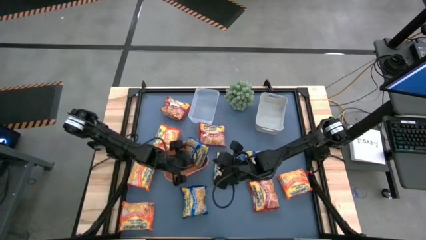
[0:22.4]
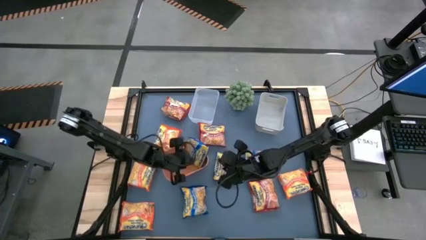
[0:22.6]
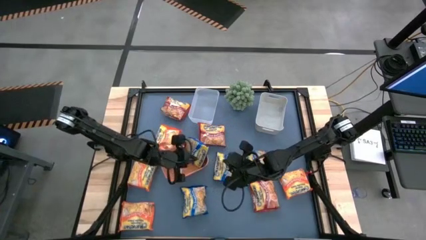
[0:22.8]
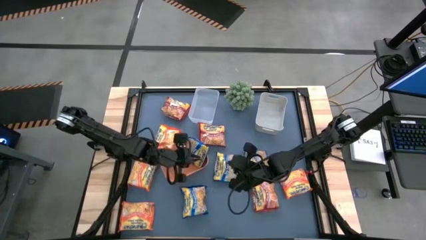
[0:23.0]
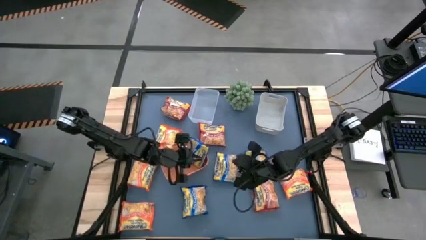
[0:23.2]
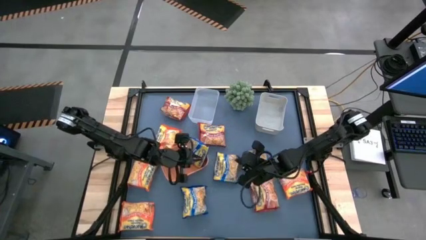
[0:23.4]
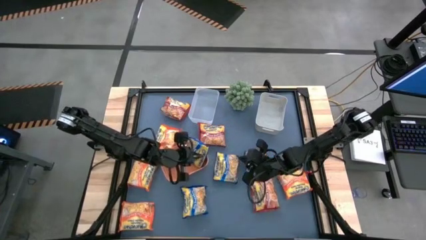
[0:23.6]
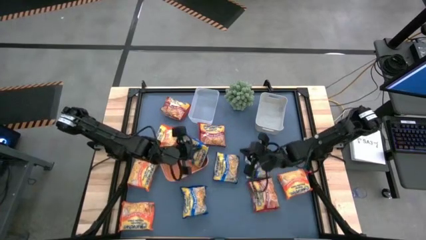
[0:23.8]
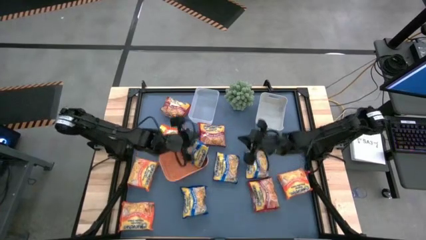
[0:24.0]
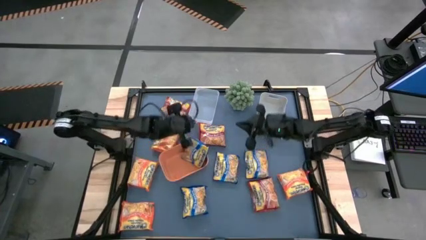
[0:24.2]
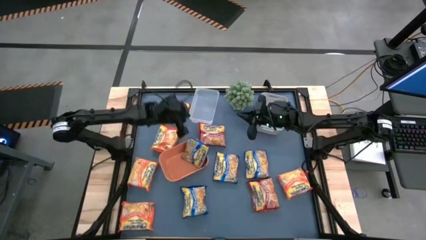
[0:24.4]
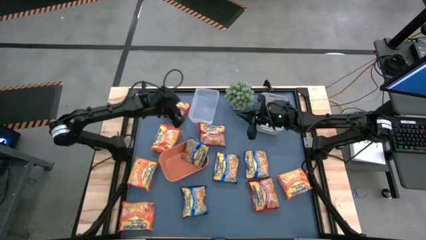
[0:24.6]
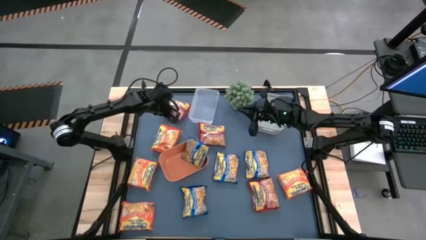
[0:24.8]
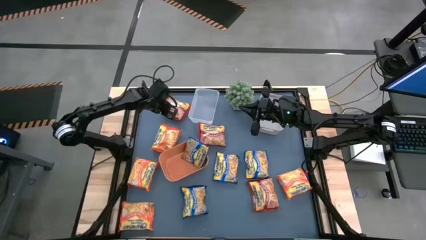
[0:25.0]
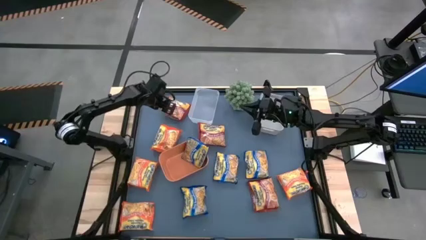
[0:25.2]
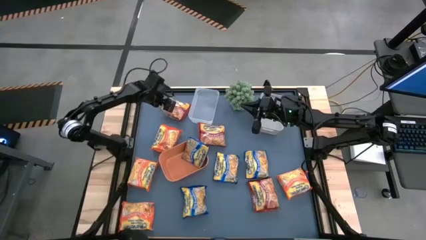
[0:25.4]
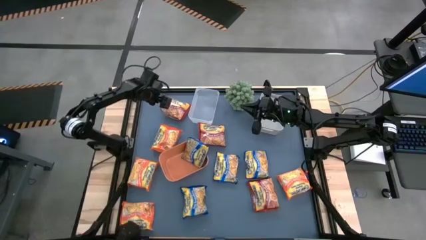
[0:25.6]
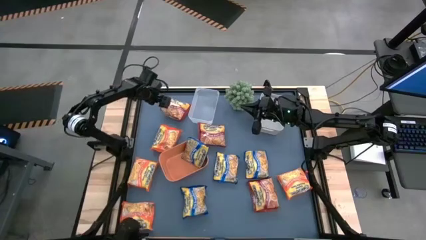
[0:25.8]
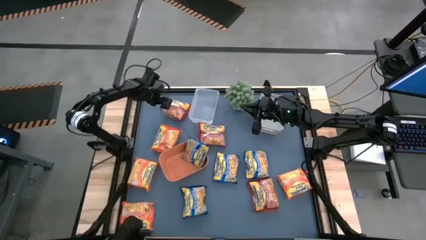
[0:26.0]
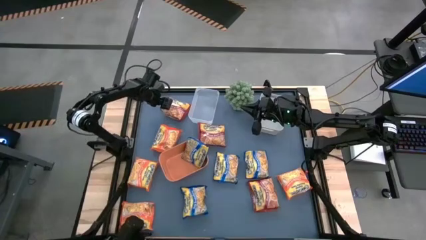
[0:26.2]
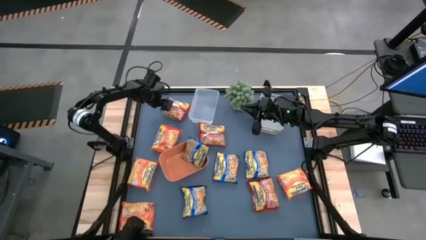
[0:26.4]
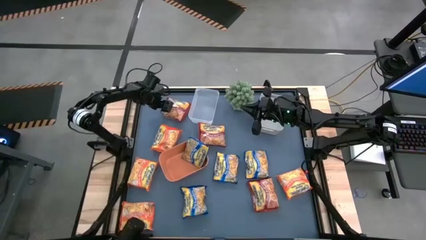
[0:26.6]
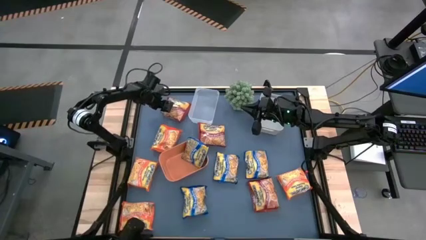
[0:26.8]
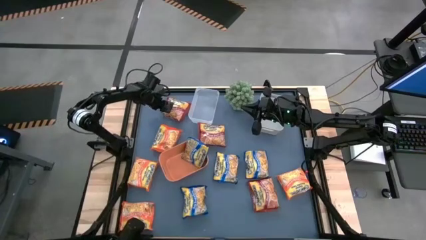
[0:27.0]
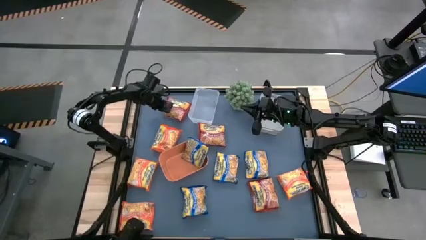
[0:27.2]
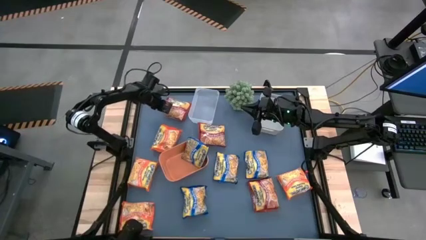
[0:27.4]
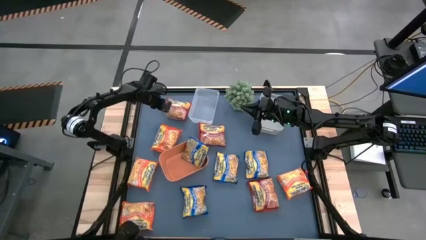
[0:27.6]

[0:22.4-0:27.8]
Task: Sort Maruchan noodles
Put the red noodle pack into the transparent bin

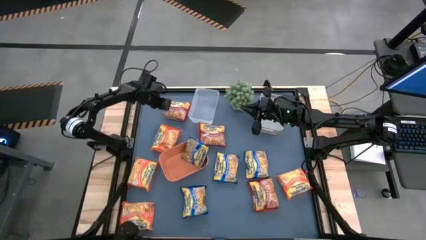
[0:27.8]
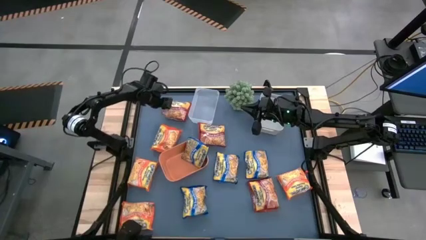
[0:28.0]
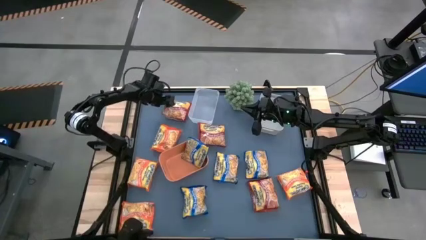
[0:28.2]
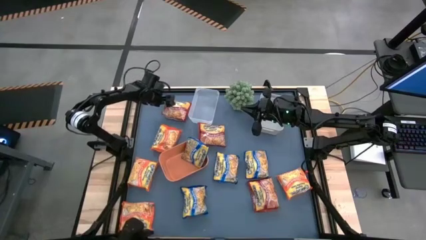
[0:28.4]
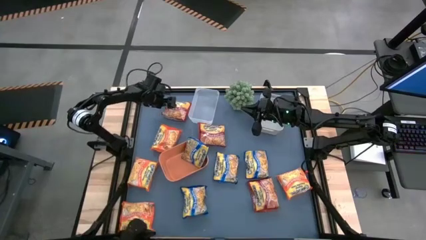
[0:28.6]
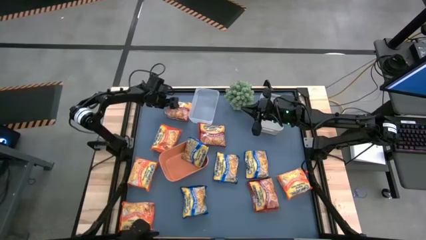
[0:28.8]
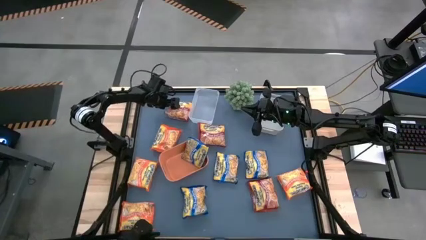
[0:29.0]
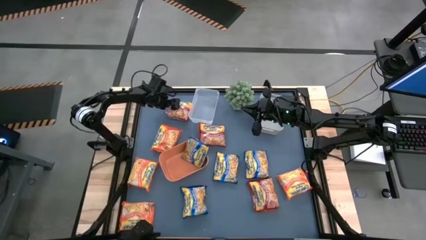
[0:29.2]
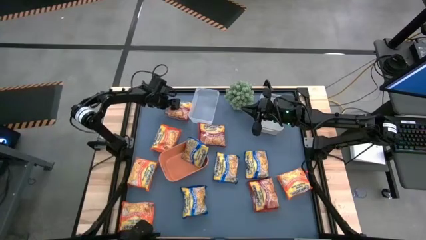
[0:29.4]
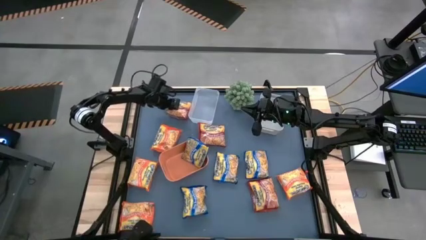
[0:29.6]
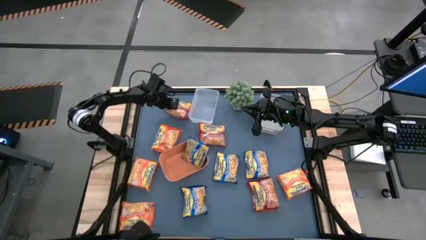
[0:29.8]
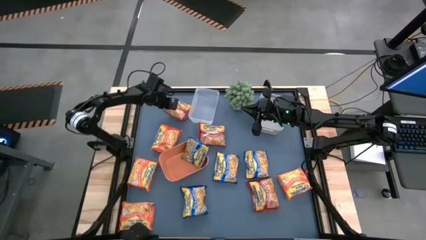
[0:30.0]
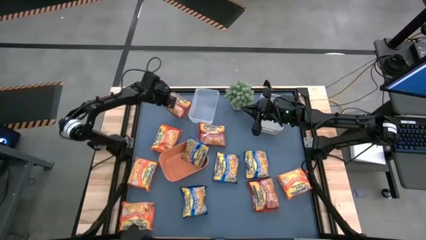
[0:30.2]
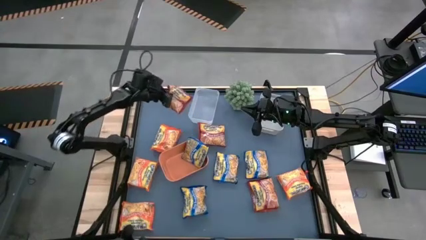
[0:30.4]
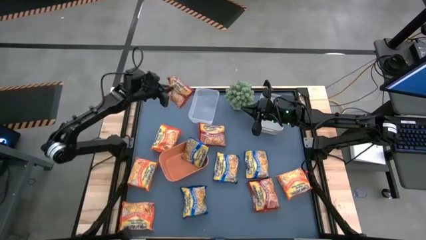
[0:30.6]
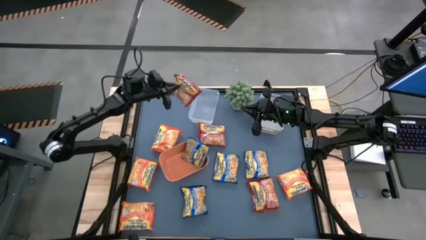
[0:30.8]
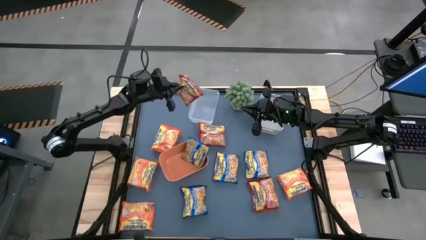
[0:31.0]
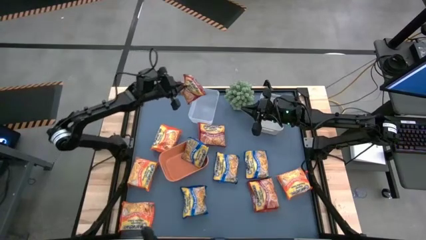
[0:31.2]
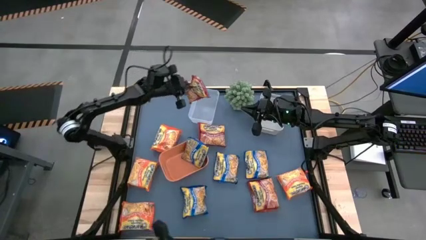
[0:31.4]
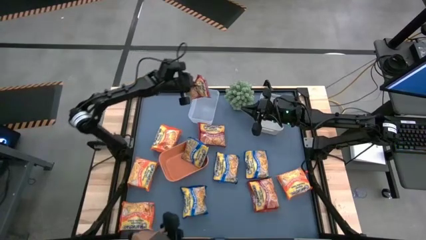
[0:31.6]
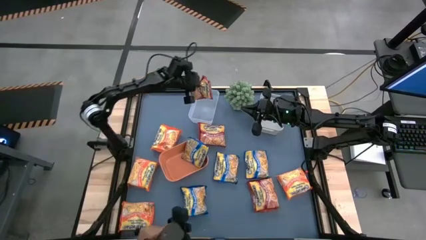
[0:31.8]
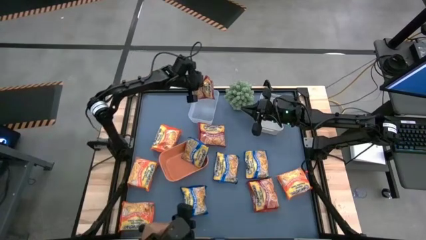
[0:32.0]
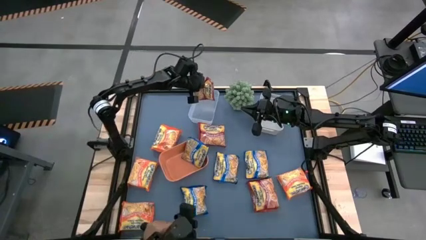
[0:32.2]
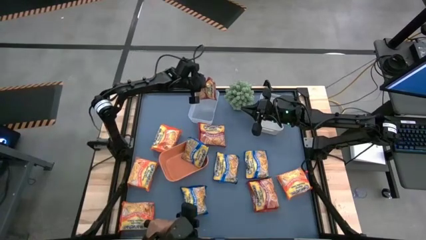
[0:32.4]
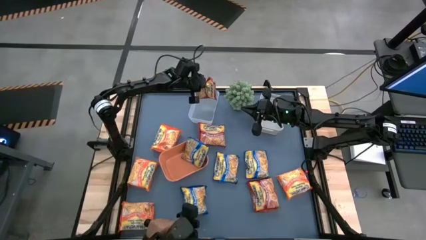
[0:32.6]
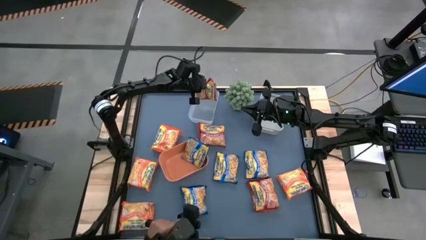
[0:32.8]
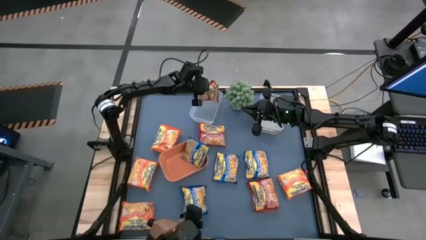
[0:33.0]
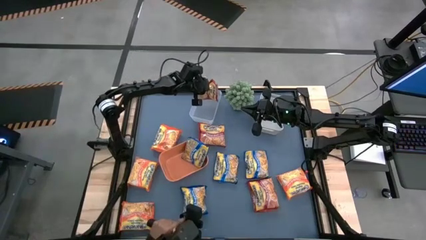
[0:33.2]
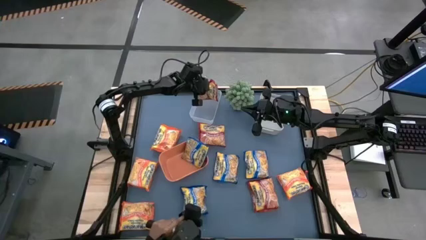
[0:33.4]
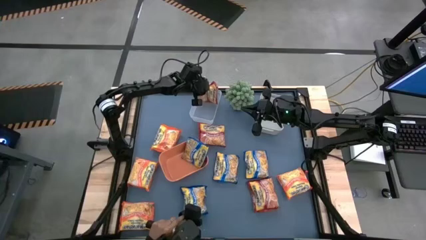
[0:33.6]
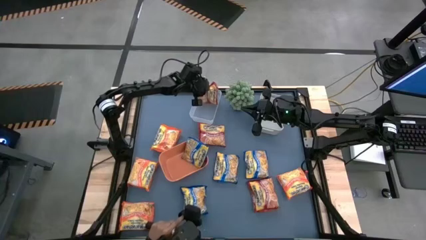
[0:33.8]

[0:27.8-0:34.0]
Put the red noodle pack into the transparent bin
